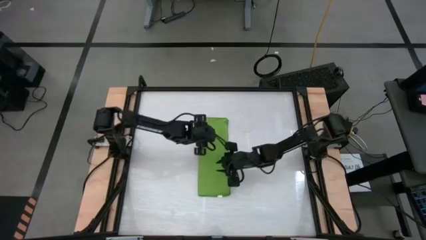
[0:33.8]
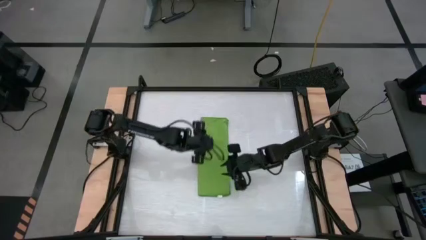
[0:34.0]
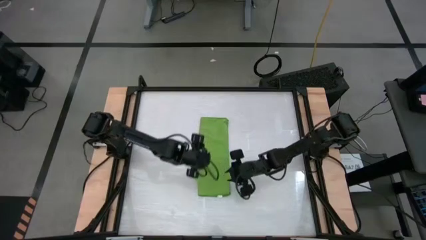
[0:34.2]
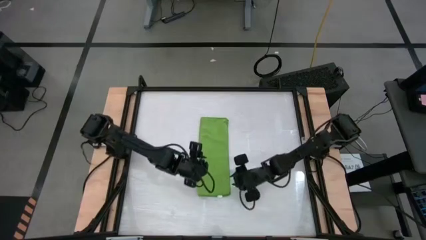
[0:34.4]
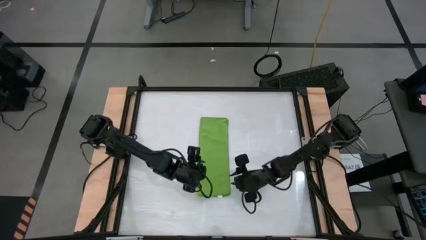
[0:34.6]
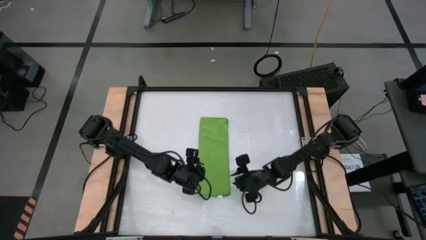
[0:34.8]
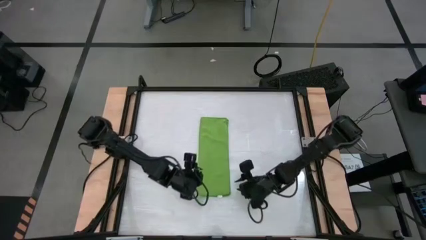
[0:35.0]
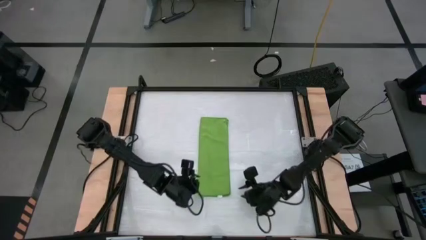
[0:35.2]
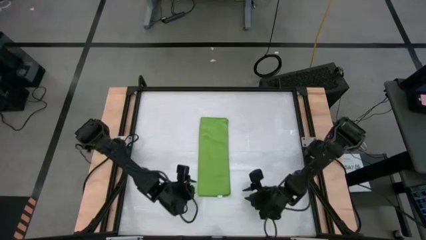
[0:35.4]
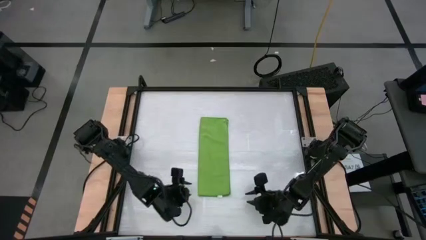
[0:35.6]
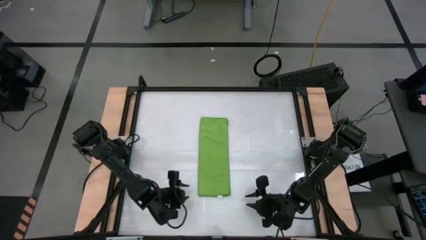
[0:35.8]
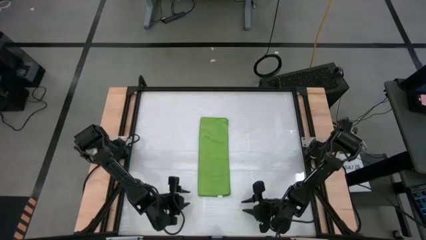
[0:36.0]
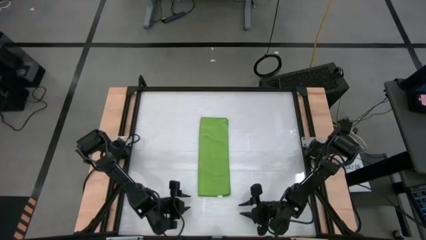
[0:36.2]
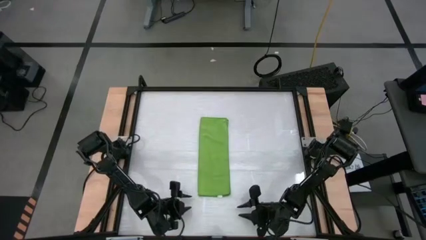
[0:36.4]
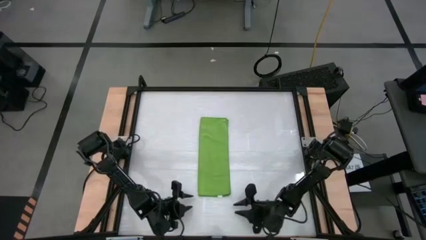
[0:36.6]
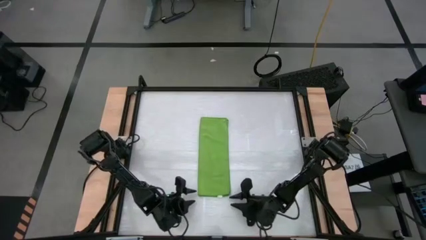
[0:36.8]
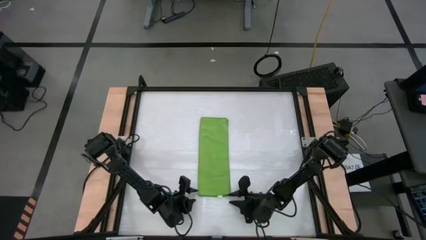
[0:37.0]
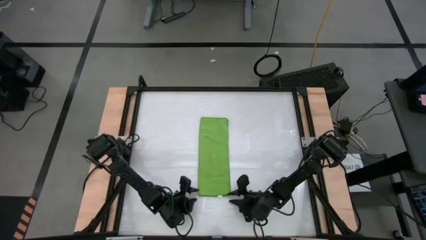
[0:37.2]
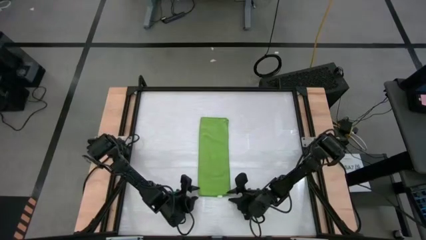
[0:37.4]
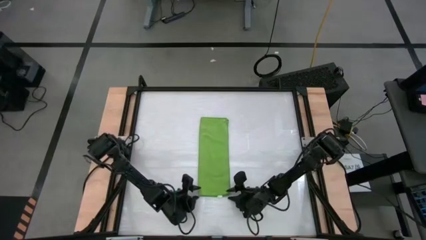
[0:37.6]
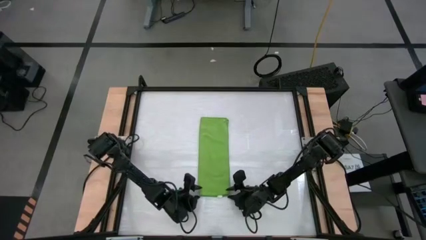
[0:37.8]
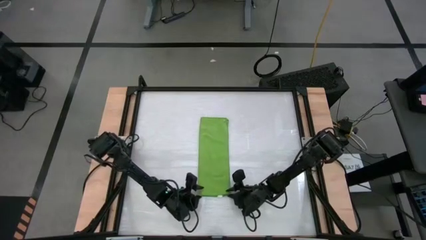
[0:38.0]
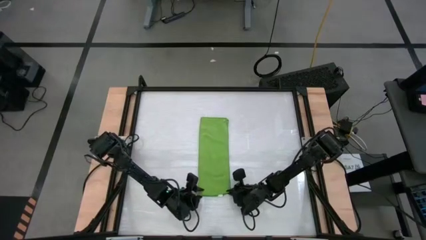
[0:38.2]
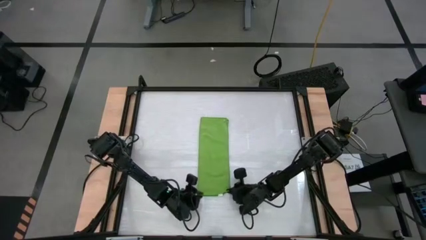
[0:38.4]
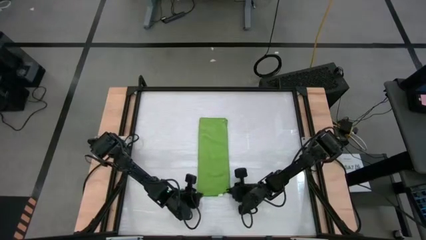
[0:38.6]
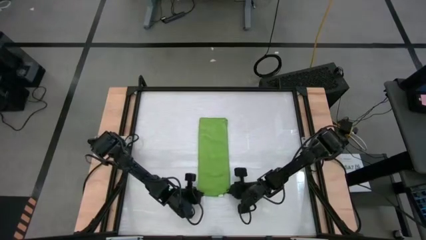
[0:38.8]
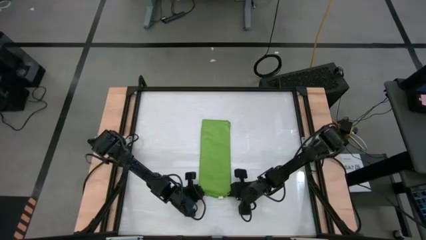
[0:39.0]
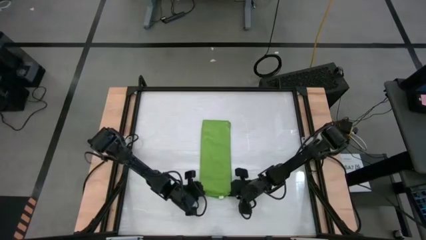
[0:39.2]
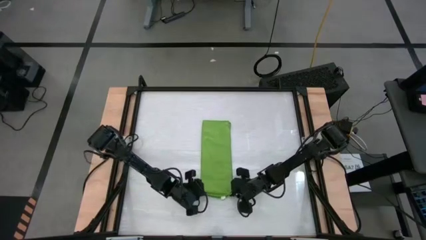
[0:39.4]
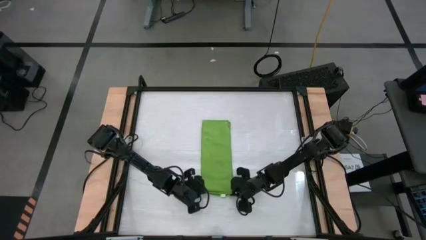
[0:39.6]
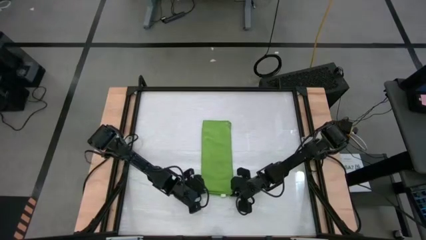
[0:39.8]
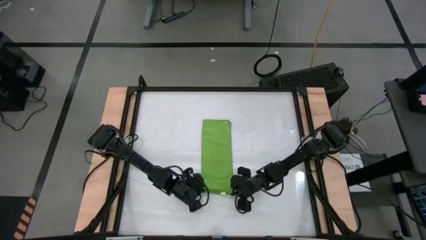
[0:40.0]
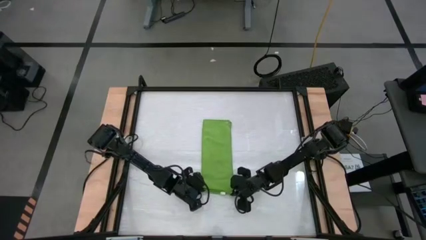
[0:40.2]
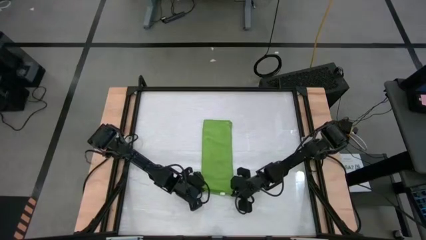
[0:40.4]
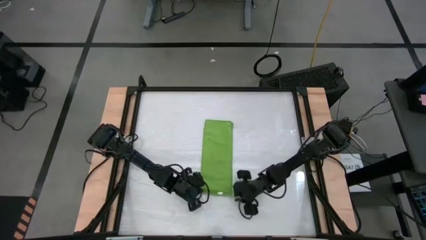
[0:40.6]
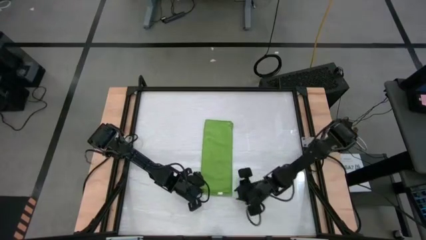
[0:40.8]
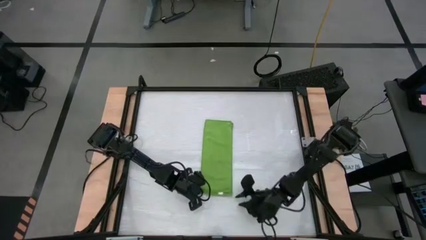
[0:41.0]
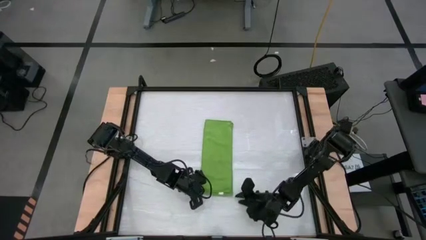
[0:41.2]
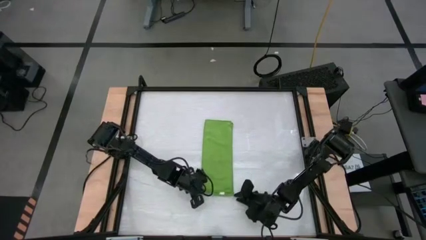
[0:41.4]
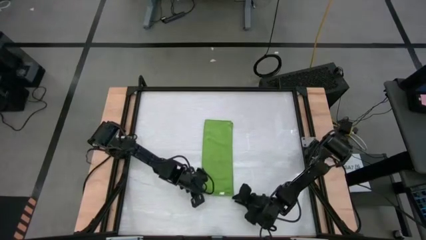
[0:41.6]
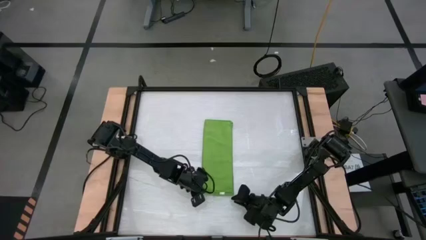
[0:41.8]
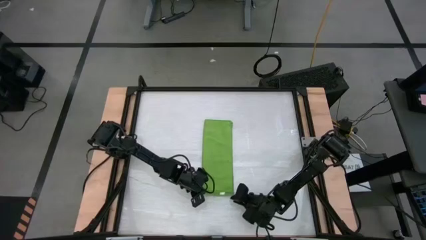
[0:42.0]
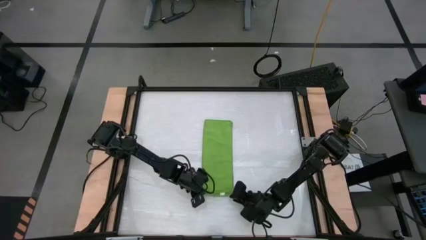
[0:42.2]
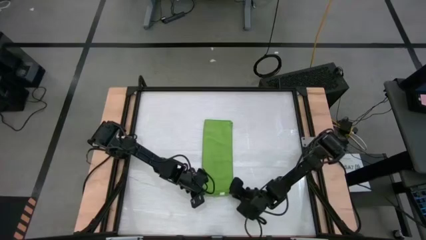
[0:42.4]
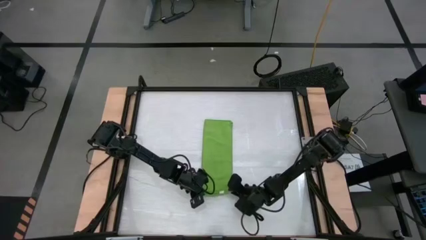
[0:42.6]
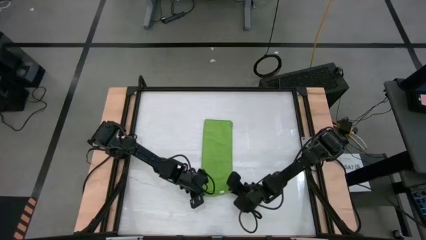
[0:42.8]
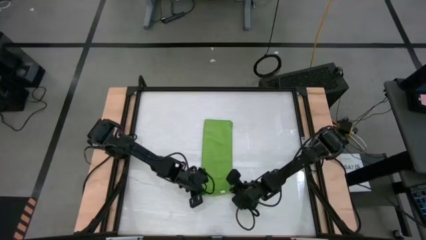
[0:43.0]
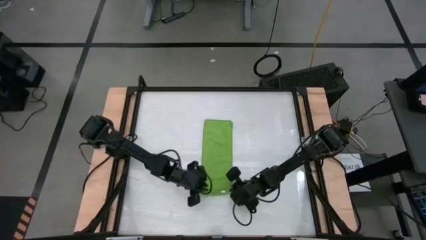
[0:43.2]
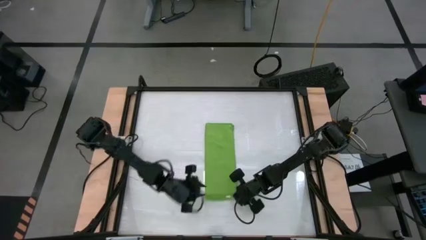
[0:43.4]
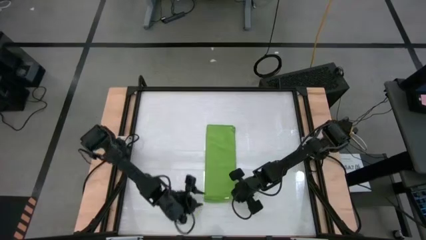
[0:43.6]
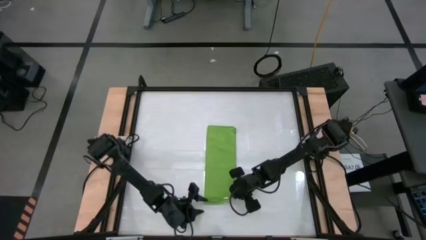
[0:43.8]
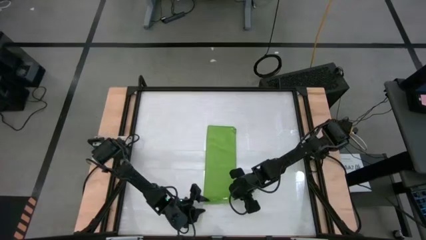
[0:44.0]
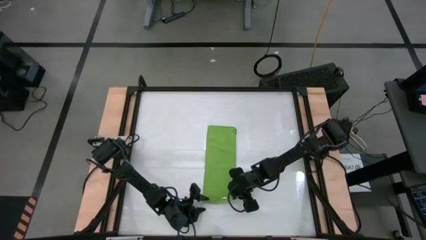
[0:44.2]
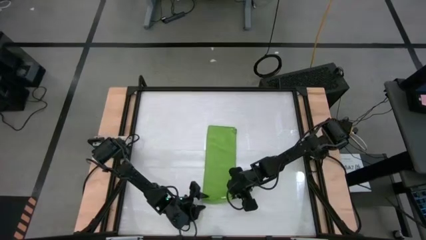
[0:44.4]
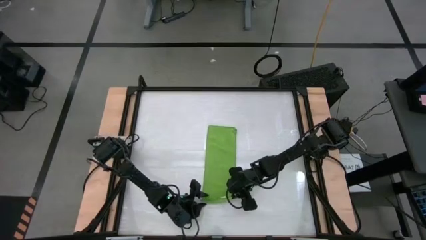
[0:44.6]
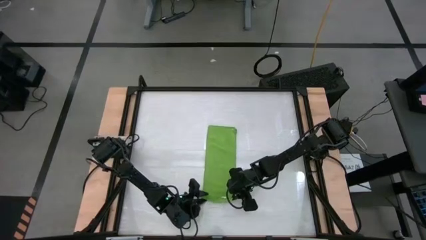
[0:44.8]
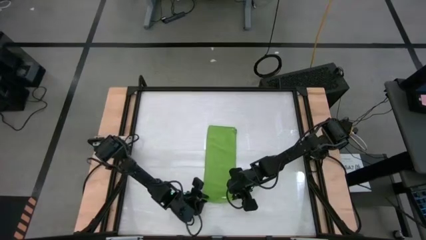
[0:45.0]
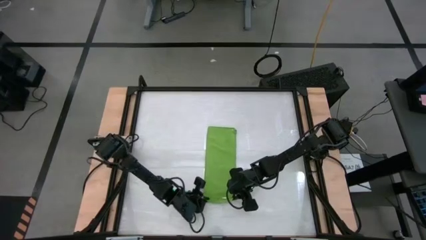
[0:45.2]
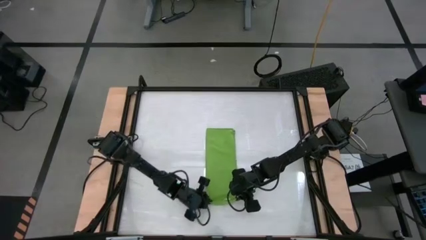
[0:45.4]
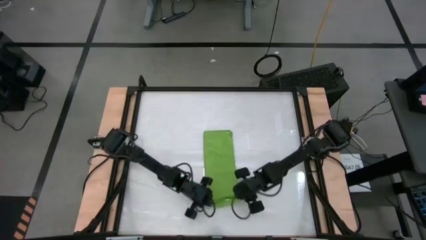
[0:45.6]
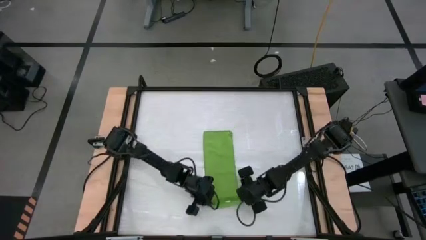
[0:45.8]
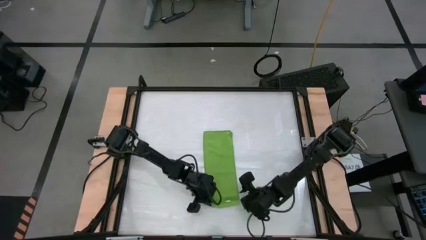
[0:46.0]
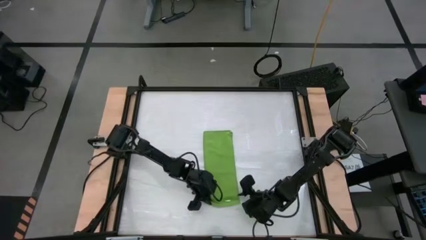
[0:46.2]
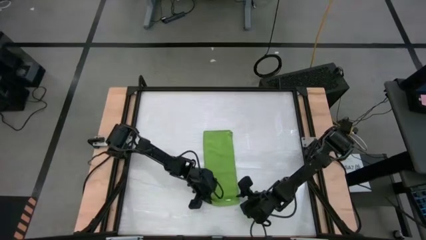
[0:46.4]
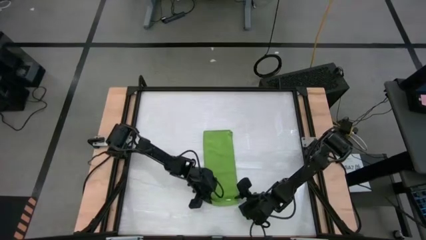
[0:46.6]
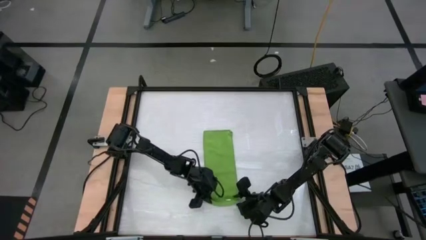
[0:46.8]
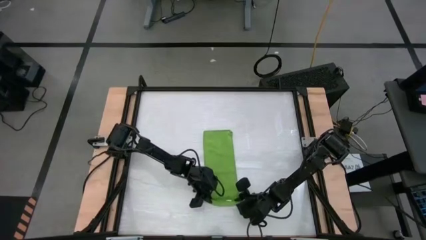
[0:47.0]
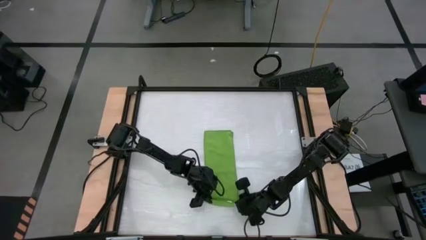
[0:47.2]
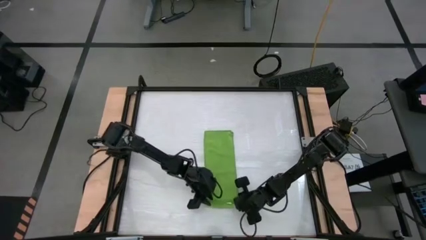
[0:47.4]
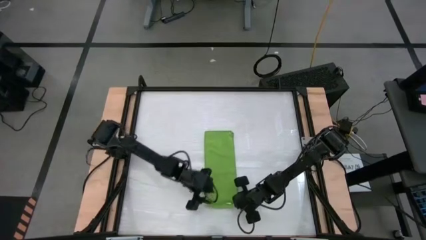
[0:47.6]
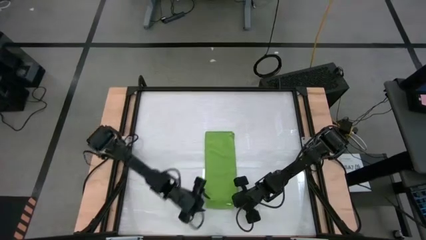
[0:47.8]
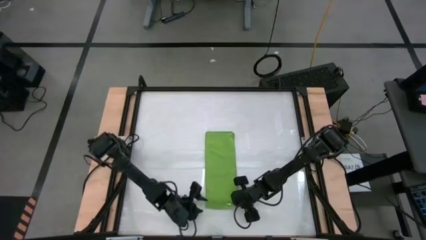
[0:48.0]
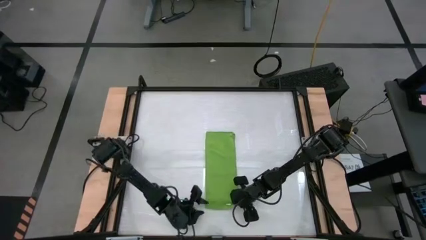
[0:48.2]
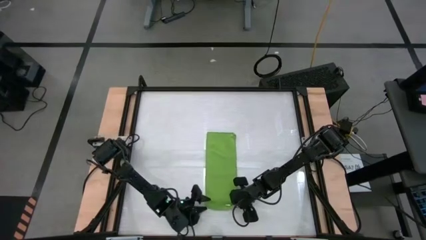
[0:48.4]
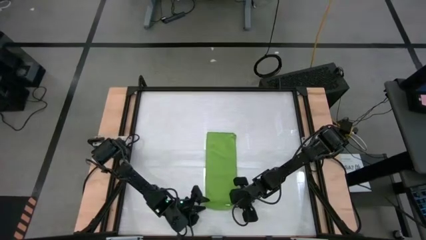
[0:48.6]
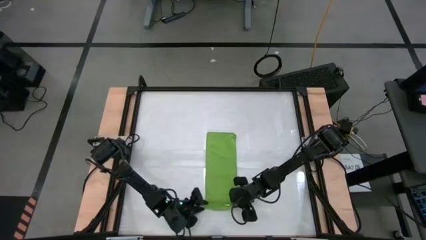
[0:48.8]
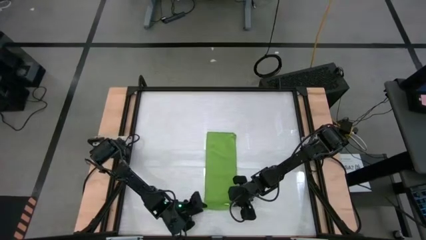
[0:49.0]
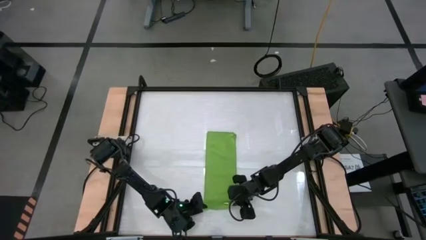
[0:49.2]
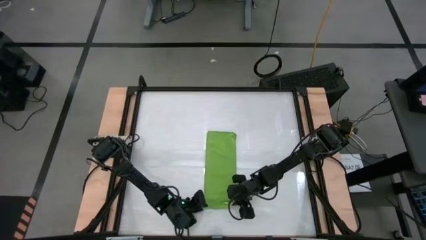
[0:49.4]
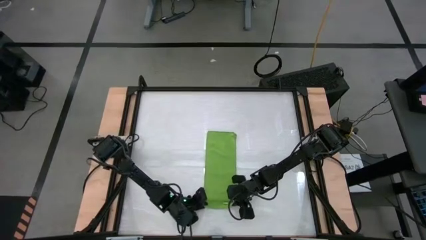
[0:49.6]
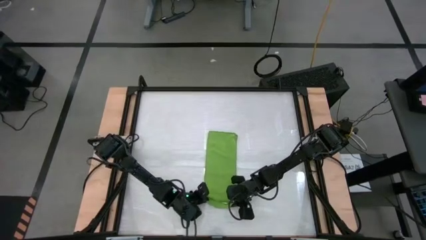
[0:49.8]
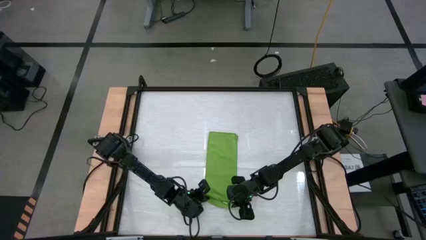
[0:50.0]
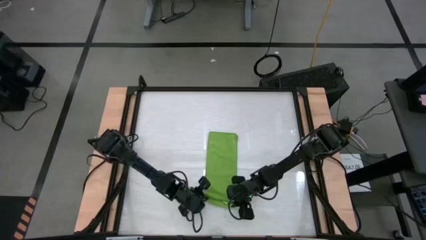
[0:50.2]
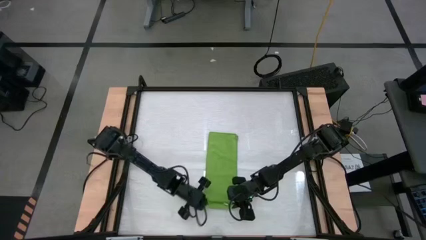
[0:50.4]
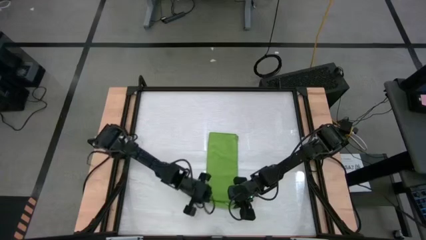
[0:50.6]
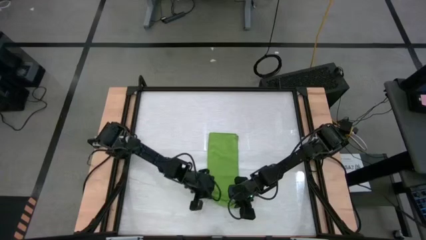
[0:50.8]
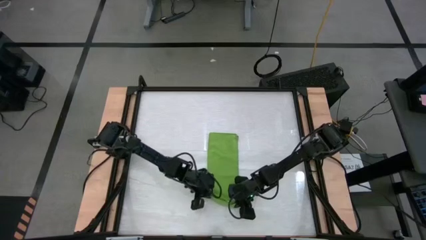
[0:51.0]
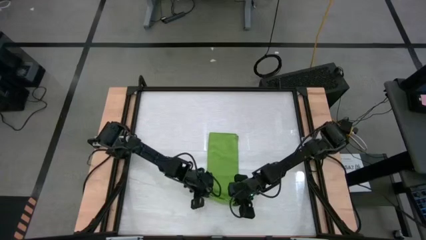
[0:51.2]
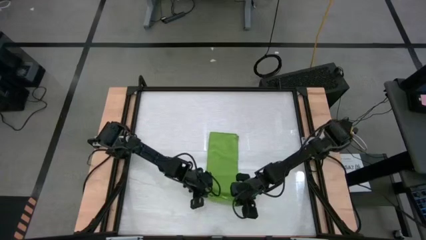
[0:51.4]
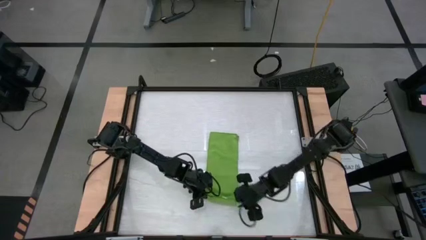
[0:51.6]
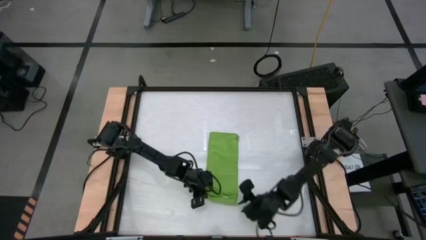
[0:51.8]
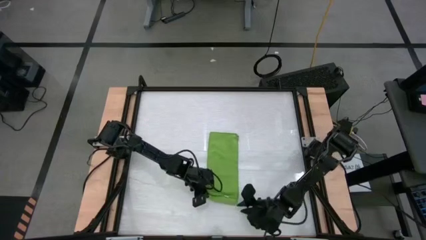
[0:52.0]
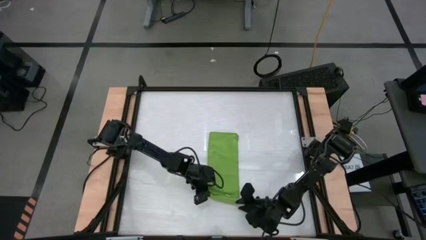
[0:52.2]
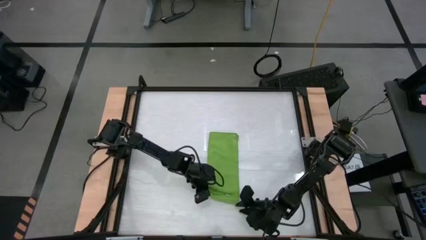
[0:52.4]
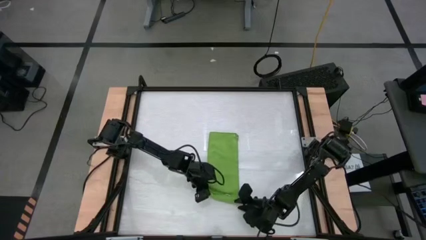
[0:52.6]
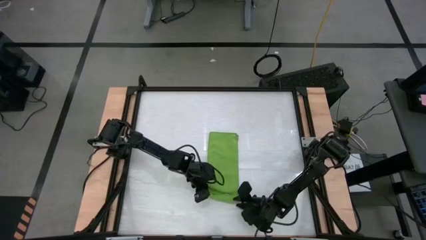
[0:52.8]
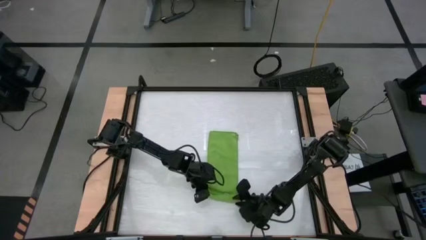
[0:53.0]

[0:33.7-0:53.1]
Task: Roll towel into tight, uniform cylinder
Roll the green microfiber towel
